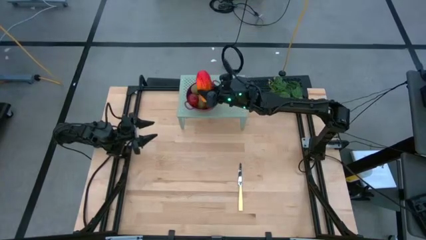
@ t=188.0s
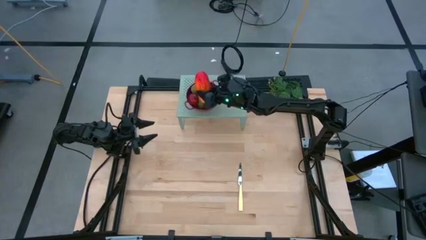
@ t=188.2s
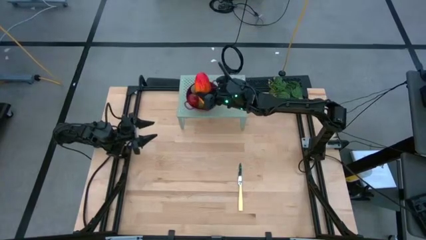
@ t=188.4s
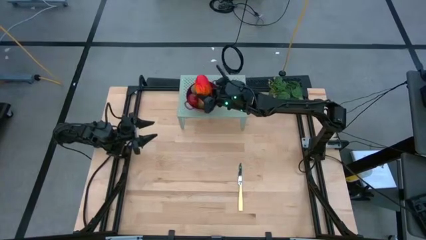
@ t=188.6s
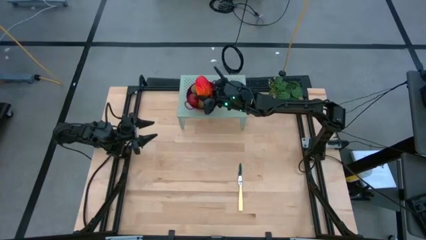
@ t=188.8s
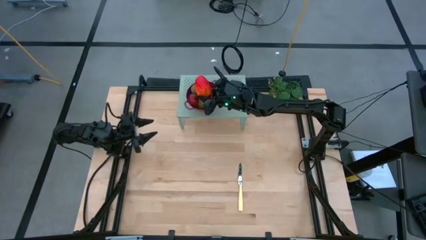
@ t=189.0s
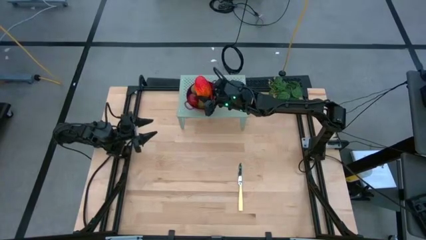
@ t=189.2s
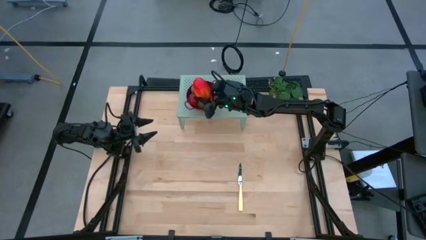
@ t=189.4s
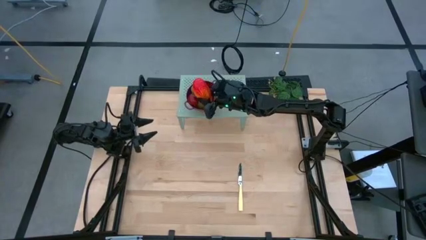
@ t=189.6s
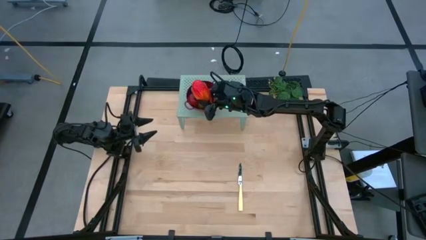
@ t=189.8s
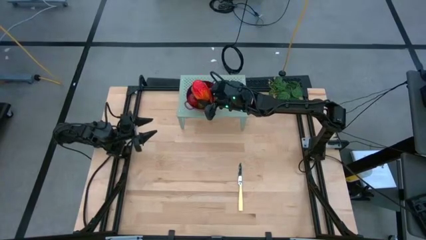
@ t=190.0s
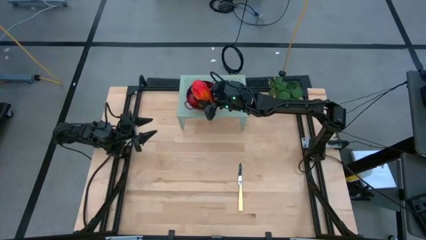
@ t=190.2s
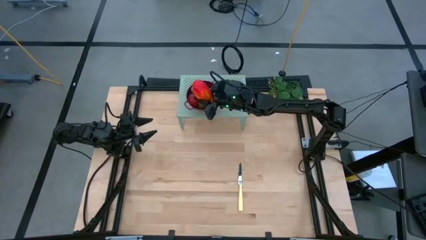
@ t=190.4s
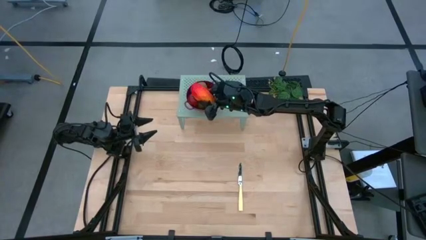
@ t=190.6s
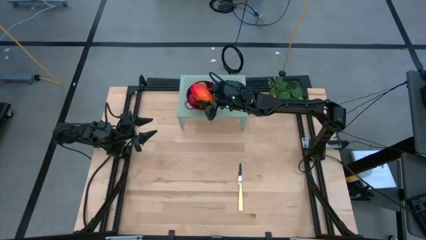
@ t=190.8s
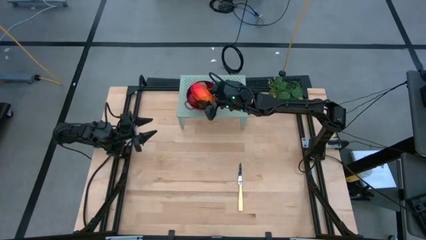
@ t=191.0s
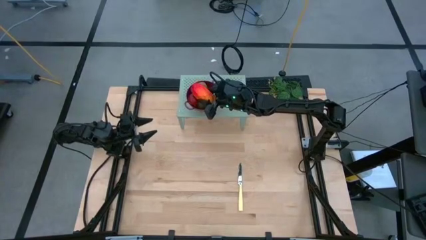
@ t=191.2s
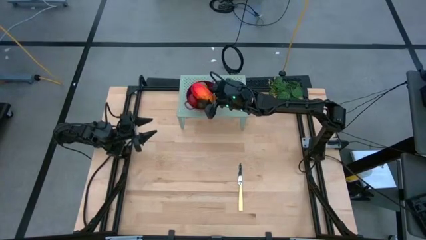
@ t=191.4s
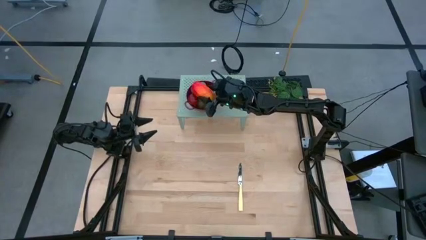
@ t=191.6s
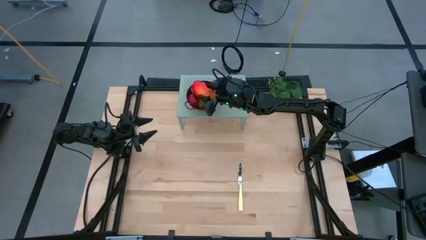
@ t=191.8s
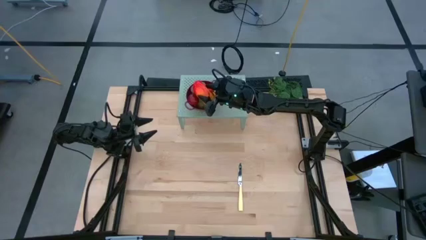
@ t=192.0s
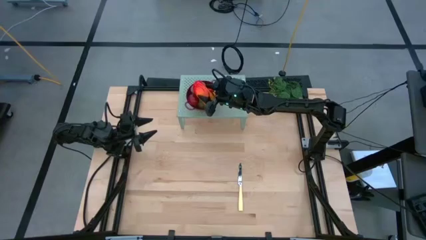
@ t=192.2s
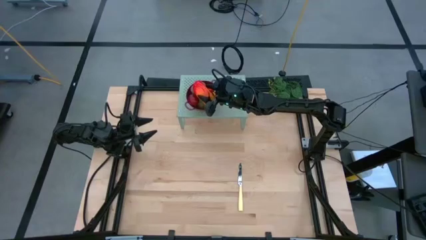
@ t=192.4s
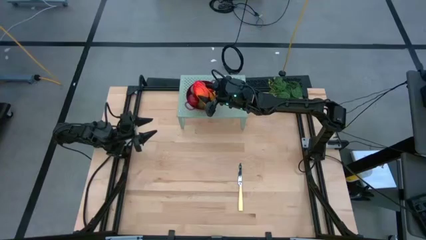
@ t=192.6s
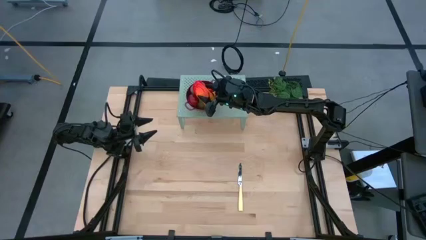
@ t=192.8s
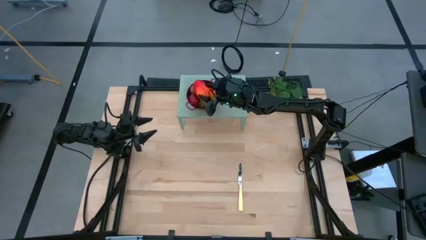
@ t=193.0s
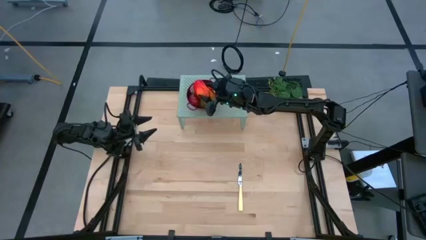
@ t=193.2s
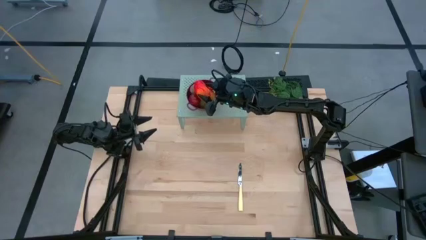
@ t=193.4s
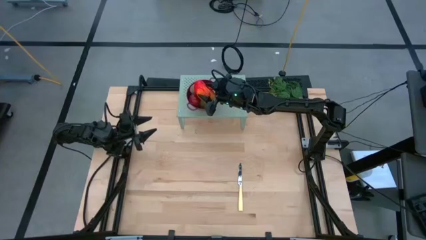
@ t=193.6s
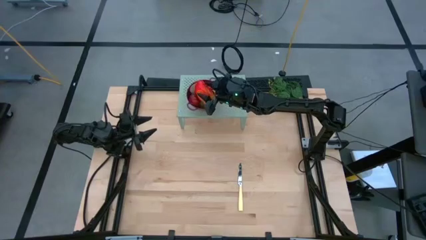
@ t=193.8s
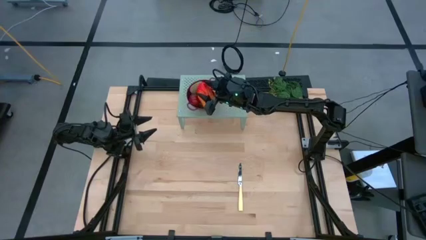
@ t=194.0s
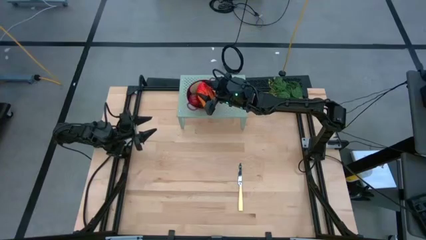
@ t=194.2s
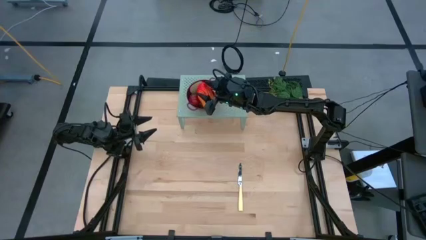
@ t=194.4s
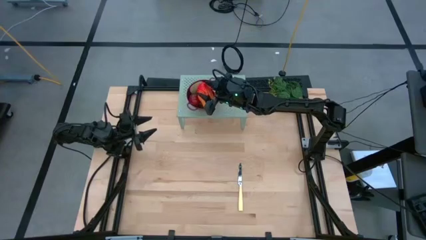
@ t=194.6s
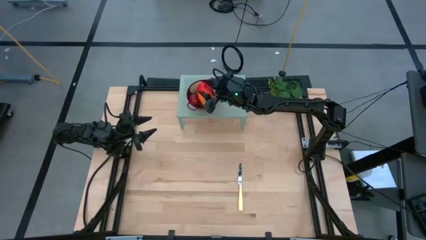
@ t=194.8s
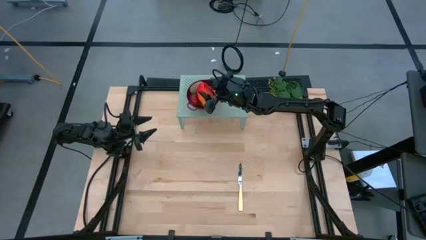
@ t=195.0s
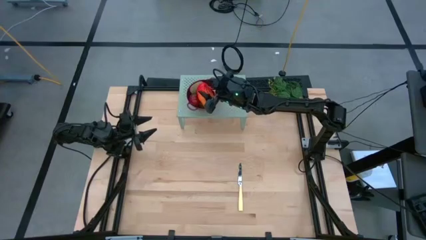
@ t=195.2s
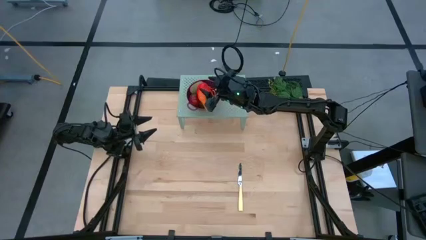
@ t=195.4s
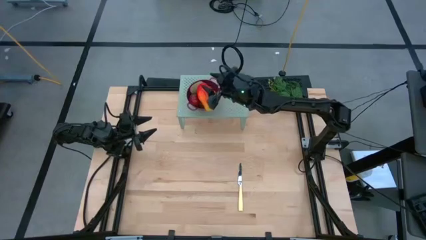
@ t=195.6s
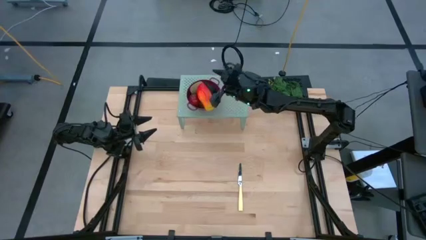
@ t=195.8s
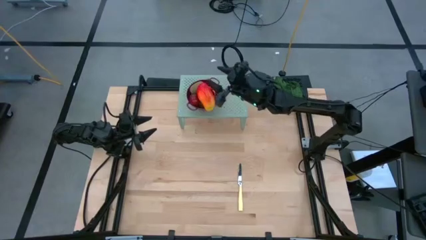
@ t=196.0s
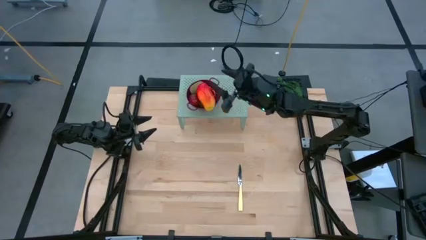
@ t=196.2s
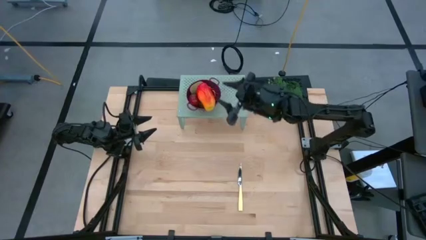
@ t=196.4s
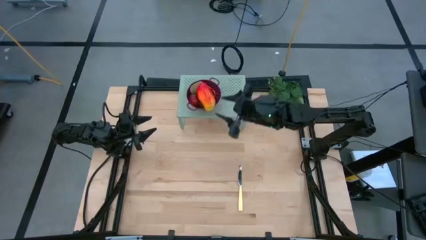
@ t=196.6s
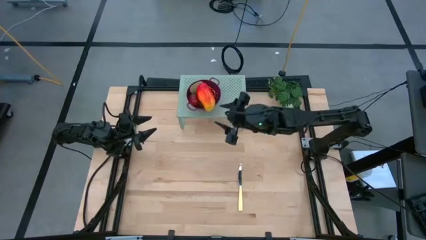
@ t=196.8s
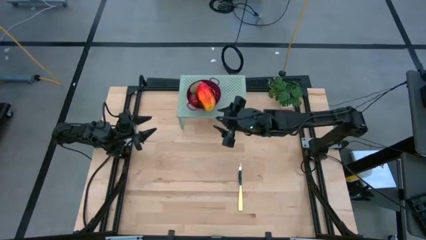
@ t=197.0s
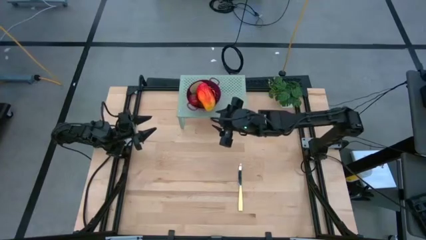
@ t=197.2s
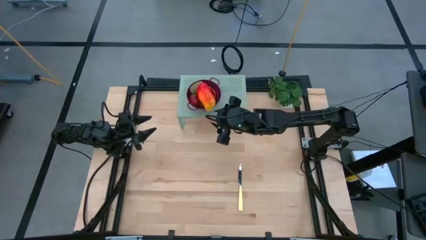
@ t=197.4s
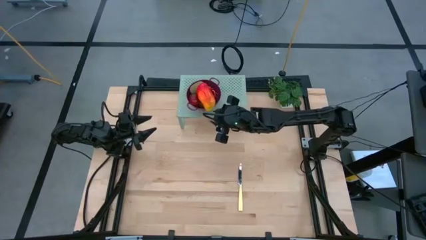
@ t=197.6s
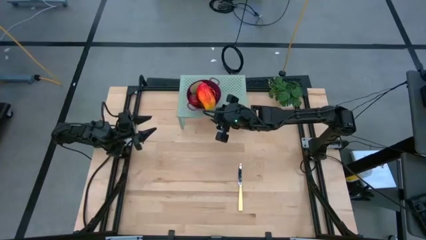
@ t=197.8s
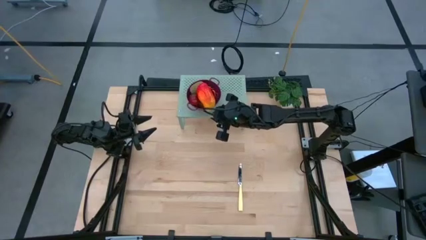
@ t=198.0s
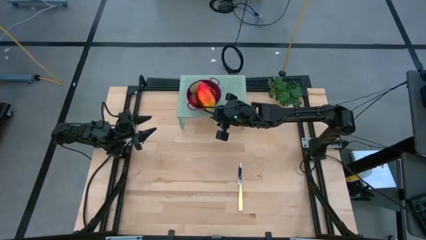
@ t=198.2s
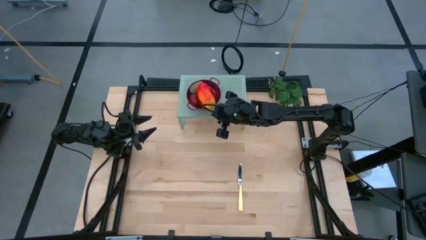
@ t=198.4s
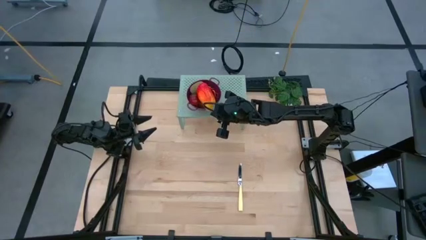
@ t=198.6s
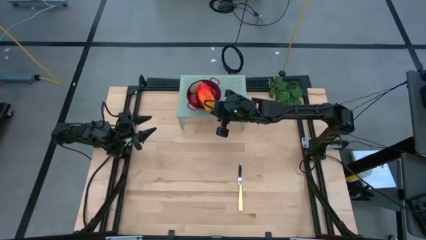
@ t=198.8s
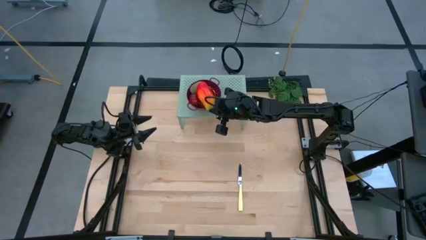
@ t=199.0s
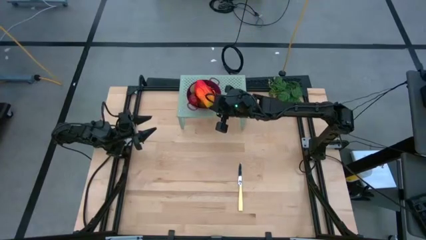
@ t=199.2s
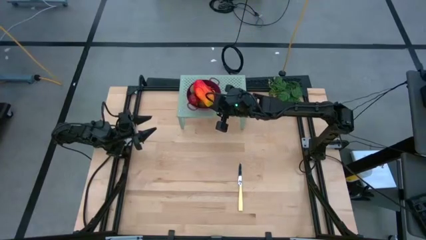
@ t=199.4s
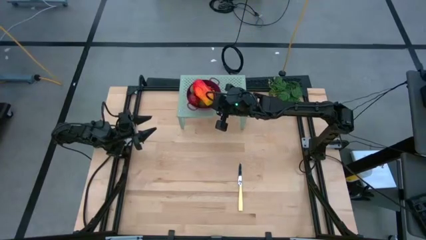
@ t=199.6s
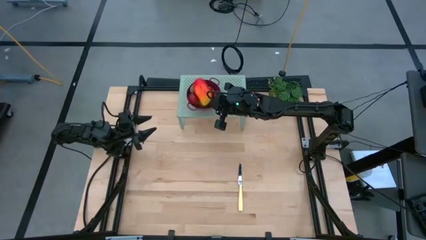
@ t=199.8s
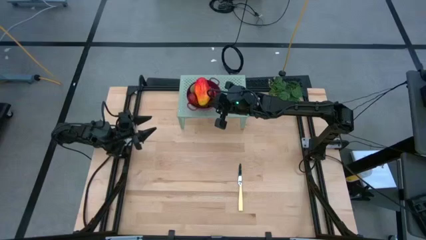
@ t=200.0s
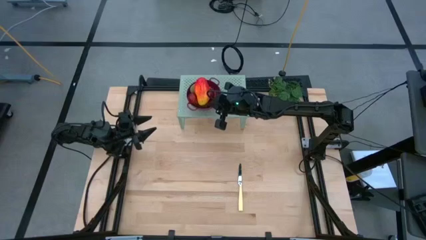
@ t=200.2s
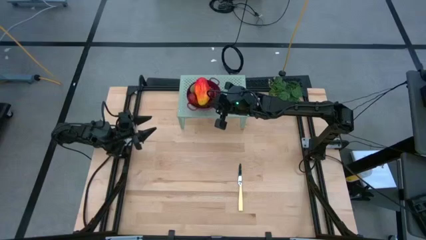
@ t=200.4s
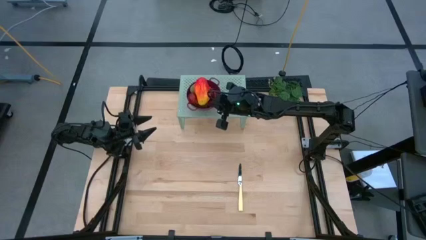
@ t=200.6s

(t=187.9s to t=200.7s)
Task: Pick & Place Fruit
Put the mango into violet strainer bowl on the shelf
